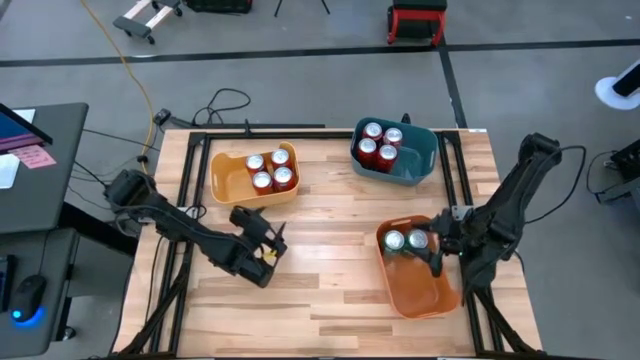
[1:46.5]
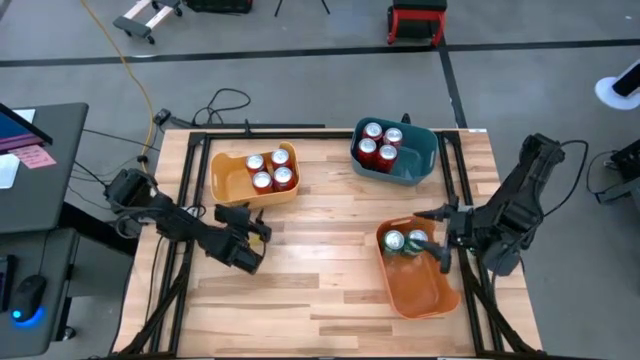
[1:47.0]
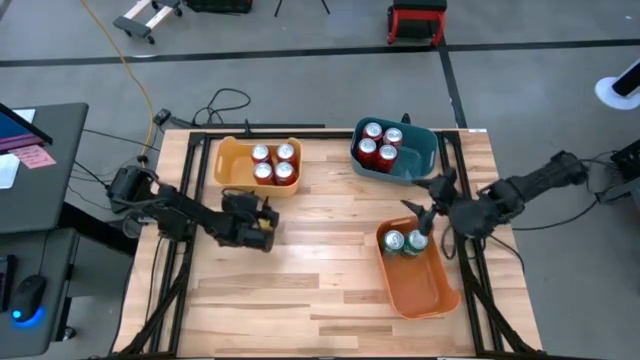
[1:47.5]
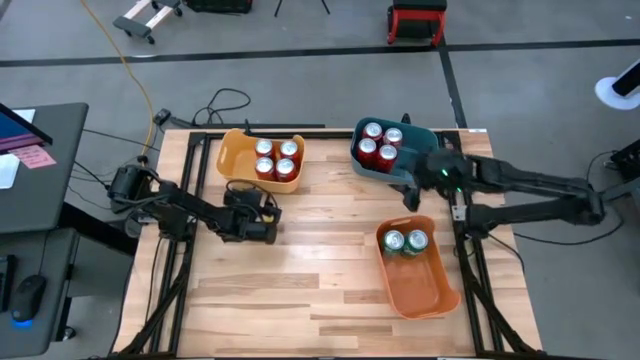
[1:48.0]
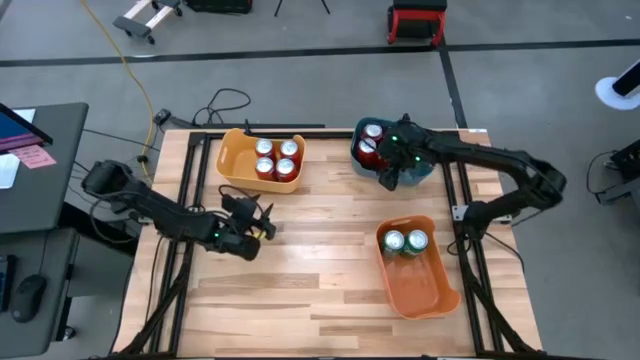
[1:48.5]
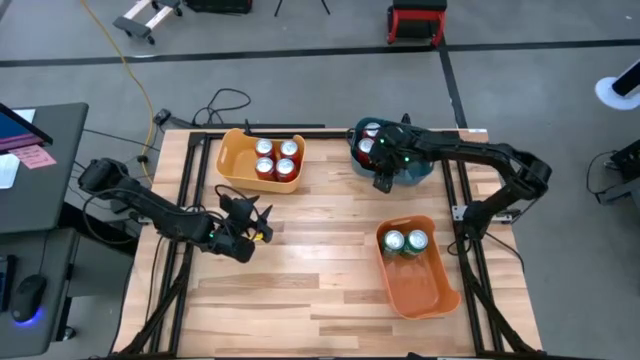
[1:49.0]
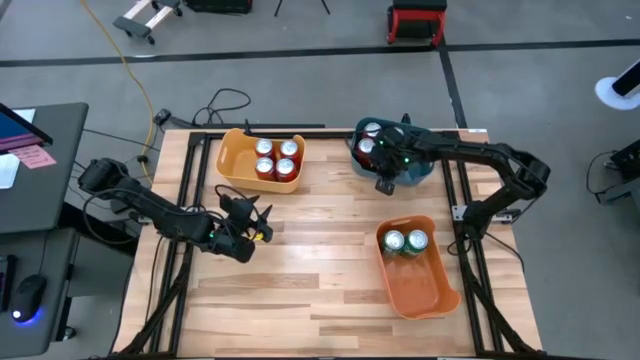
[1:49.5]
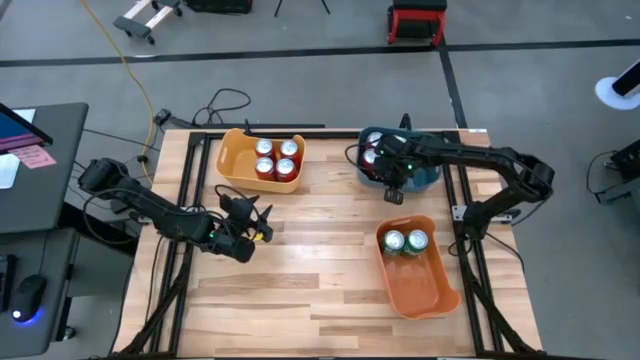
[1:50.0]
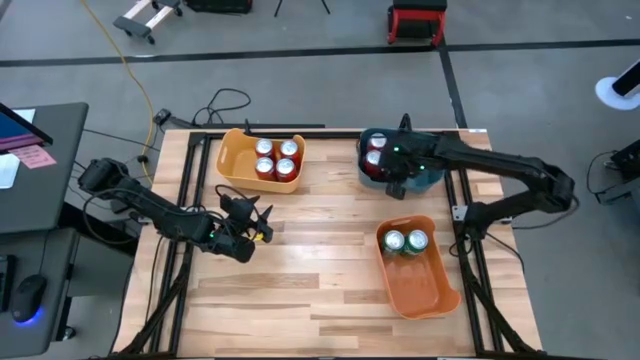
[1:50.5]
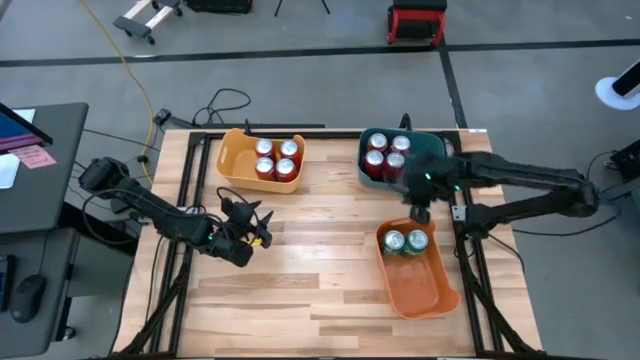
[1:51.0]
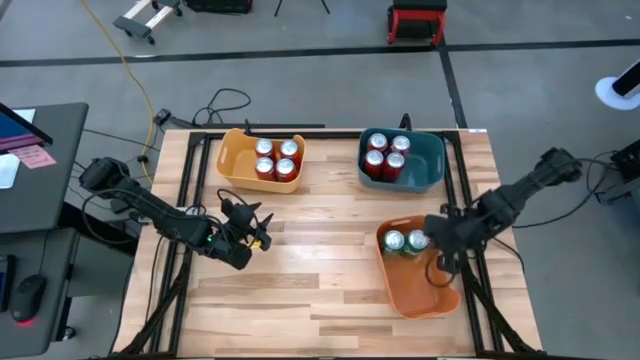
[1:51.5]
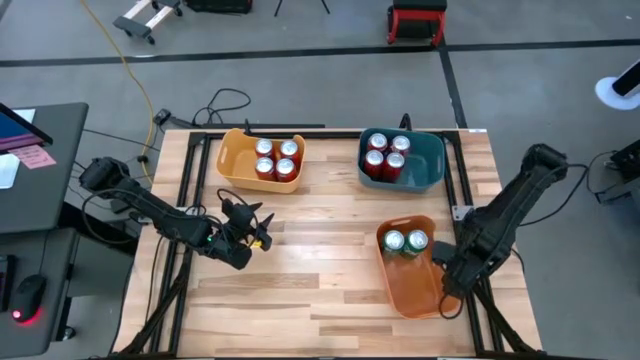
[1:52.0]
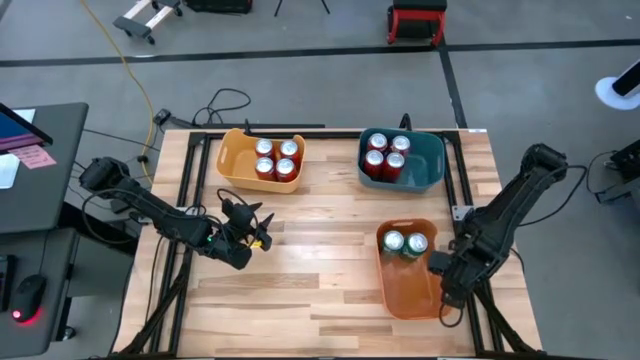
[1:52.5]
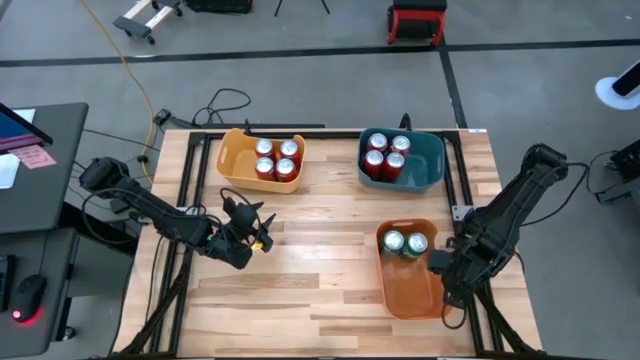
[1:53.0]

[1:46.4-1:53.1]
Task: Sort soda cans
Adjust the bins

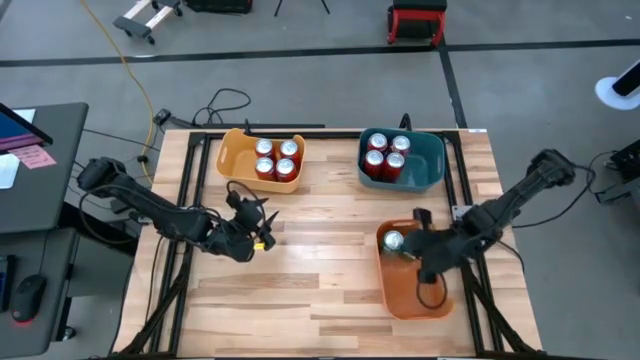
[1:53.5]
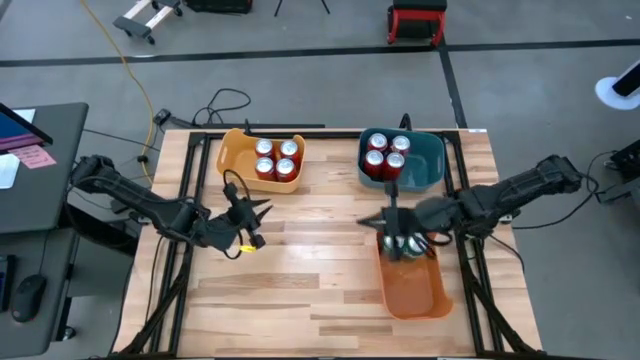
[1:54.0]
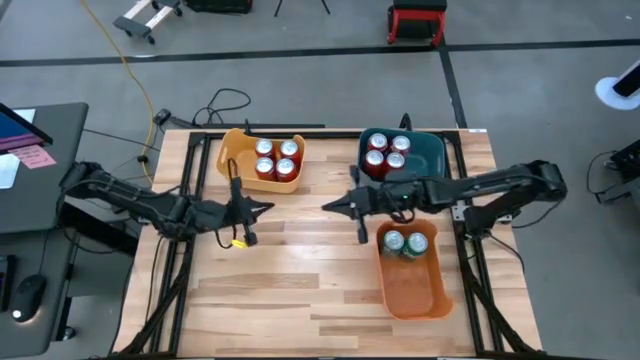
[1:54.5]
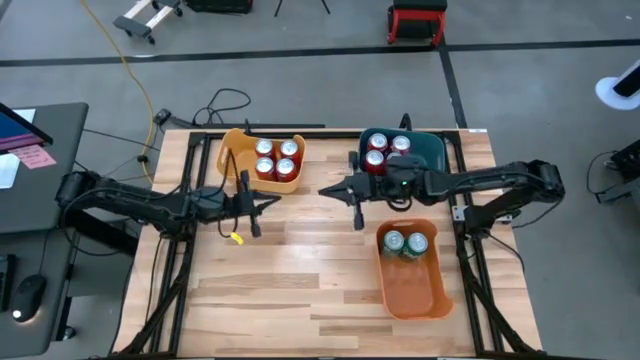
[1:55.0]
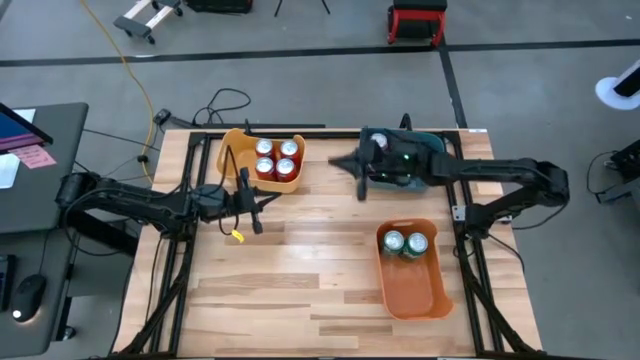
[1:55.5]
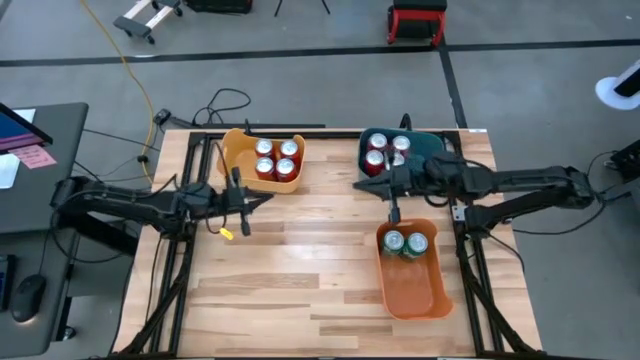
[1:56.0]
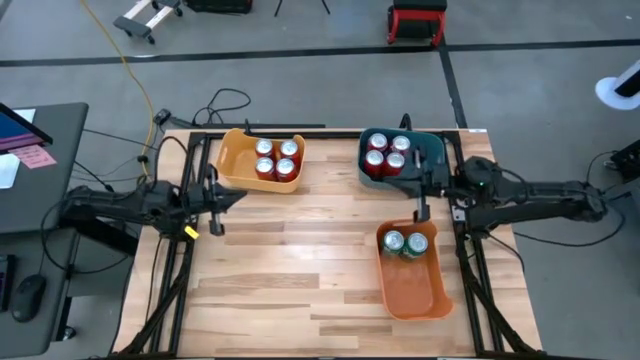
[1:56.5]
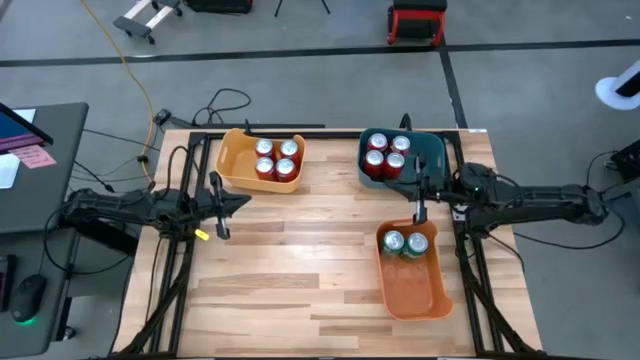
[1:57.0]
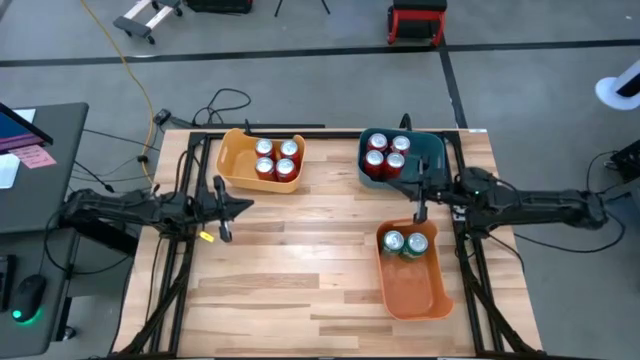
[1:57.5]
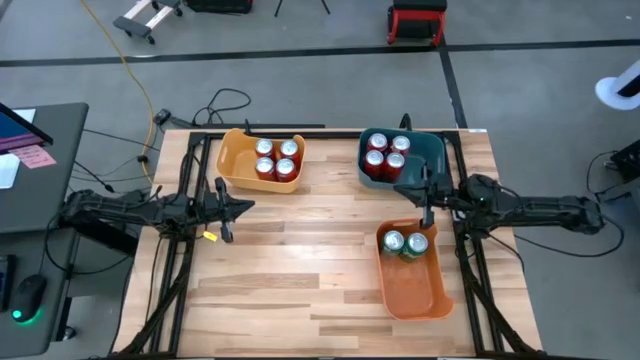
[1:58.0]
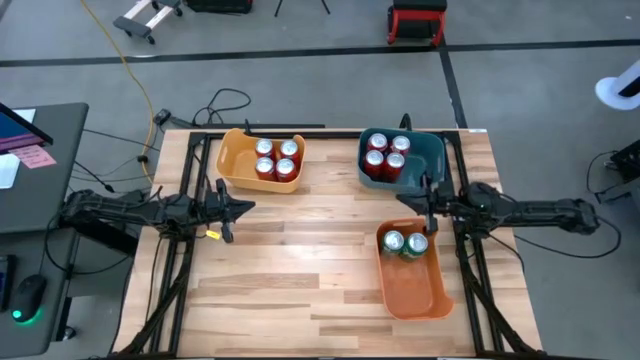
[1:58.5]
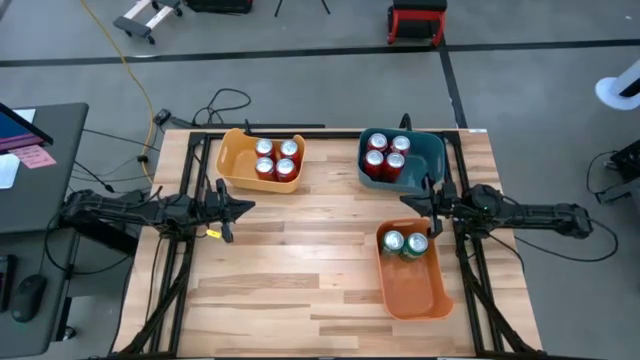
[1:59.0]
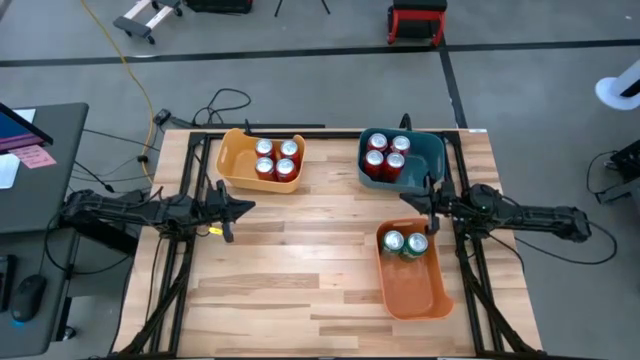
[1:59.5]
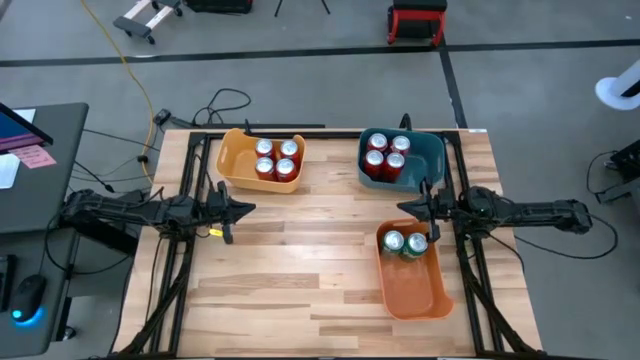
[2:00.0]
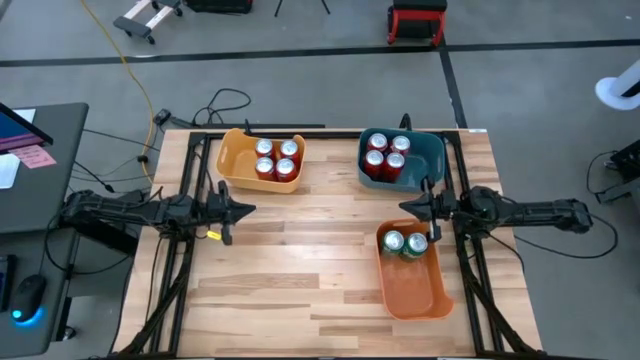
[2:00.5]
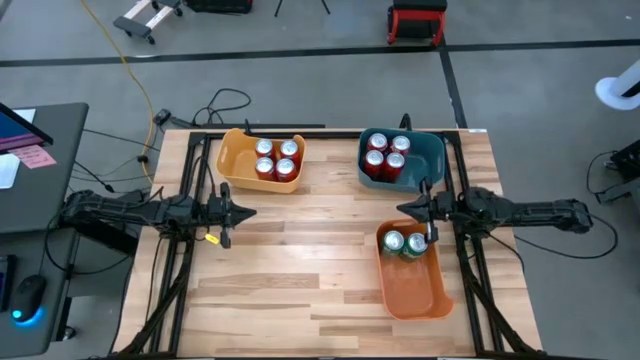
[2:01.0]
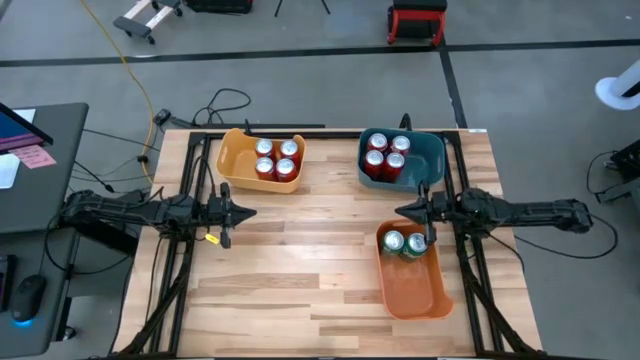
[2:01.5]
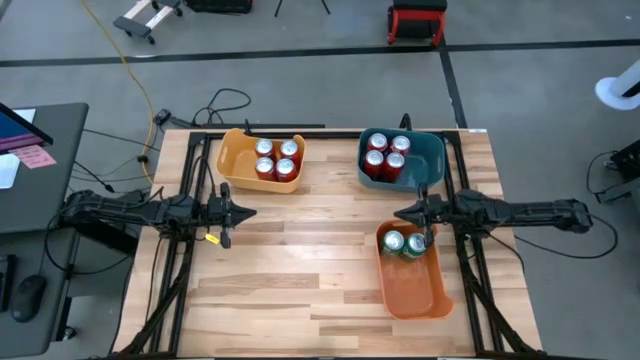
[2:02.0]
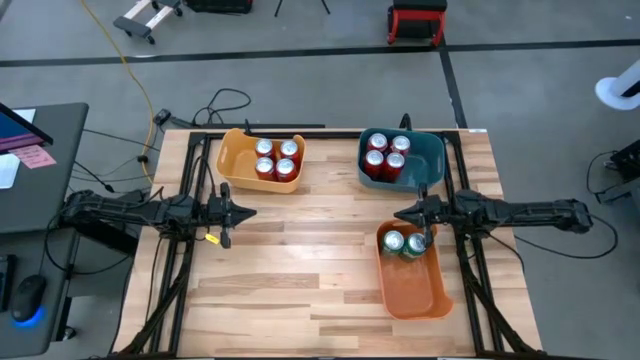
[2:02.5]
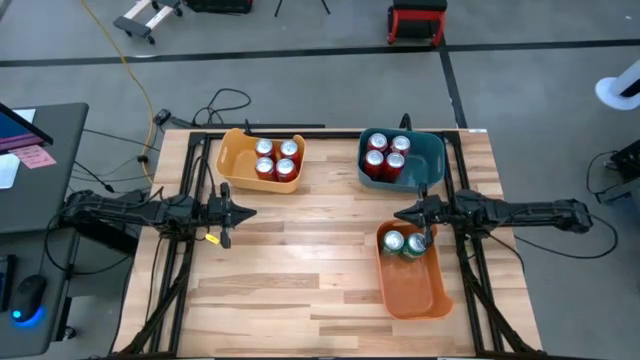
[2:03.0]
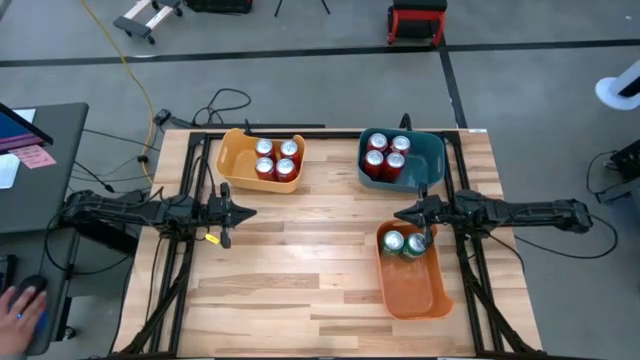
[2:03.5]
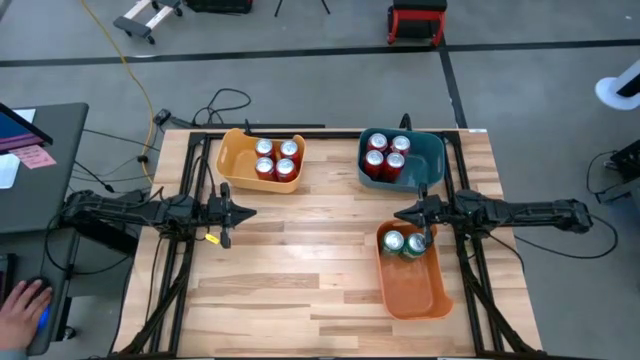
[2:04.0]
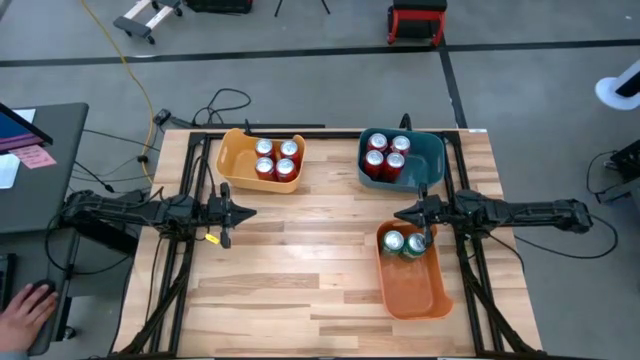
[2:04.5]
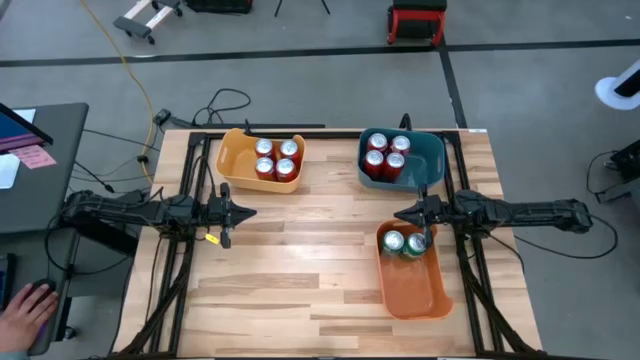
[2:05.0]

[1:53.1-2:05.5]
Return to Home Position

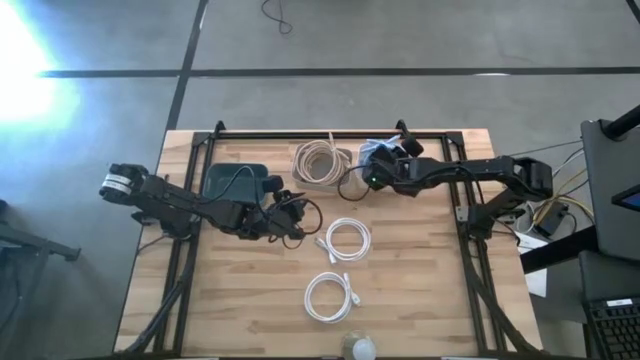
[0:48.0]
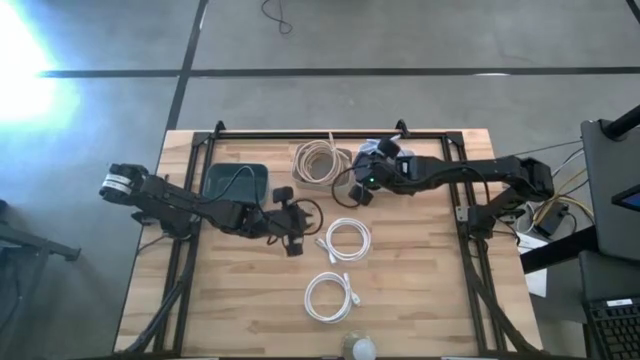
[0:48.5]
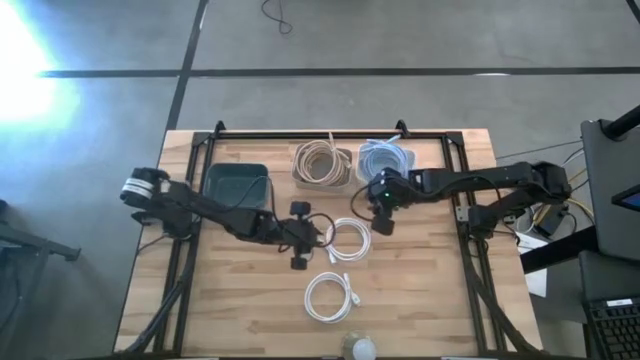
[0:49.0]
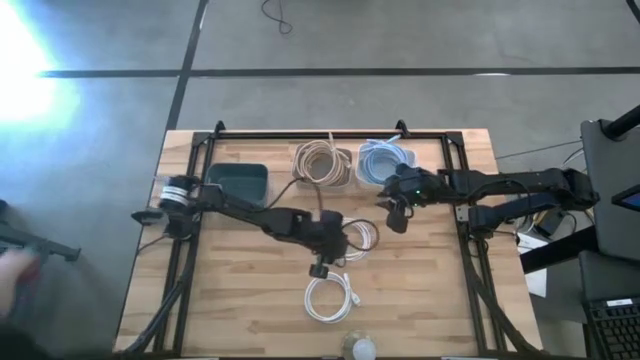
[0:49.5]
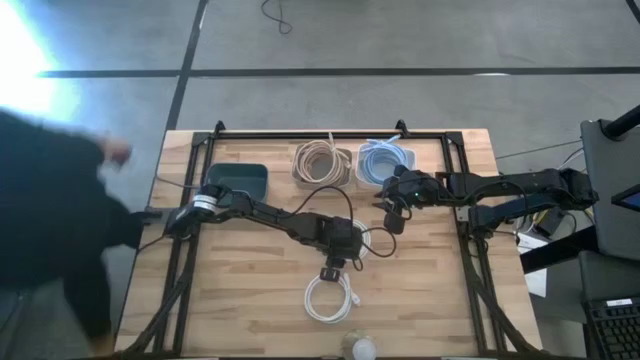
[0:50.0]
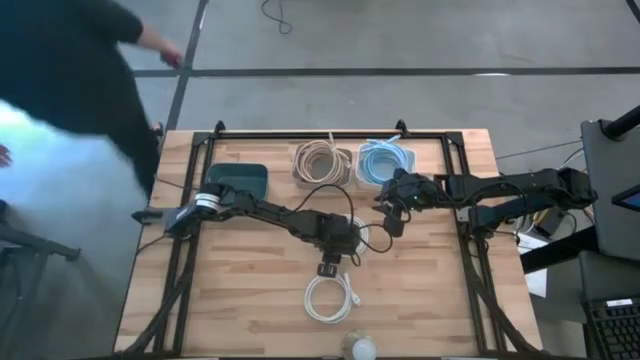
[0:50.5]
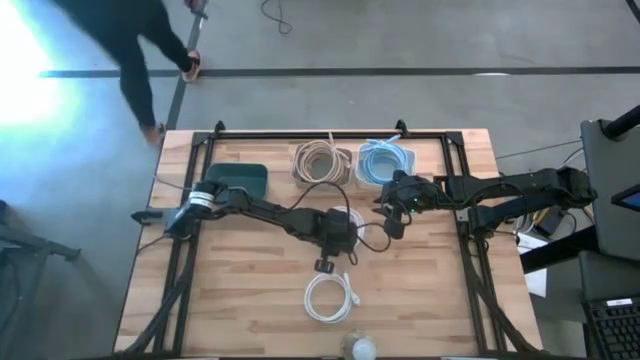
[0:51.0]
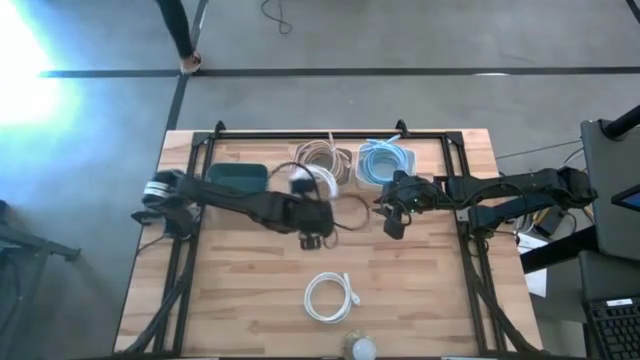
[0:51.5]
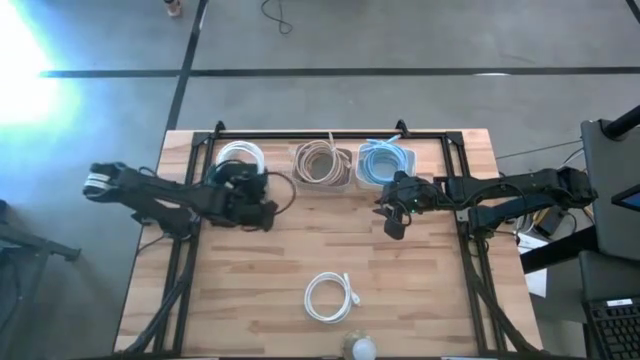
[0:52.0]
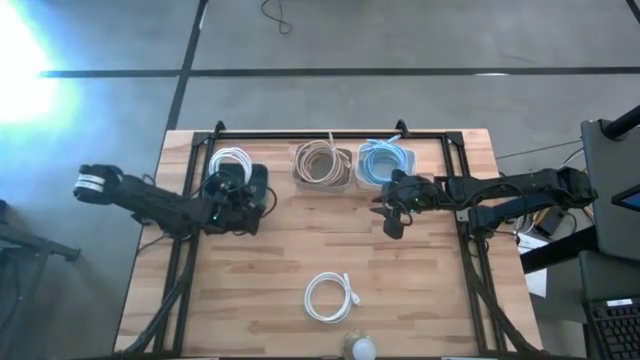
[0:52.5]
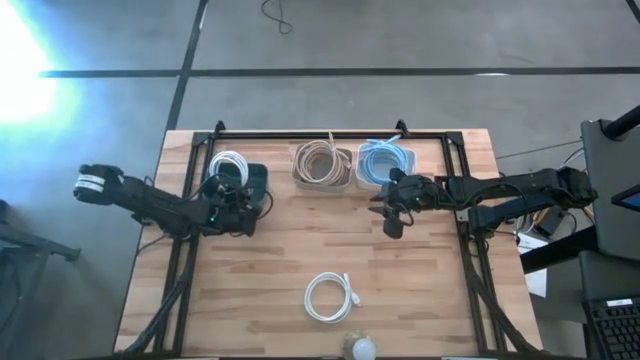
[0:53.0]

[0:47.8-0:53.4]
Task: Pick & Place USB Port
Put the top white USB cable into the green bin
